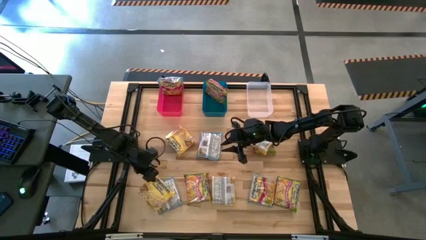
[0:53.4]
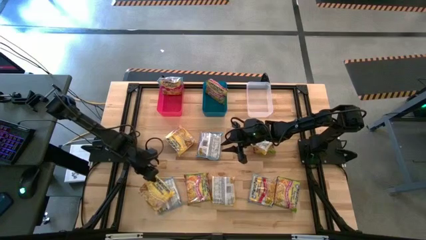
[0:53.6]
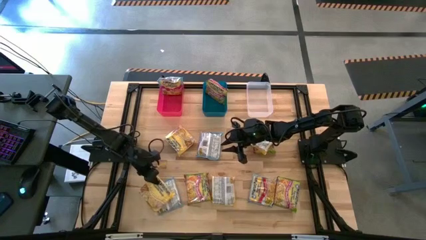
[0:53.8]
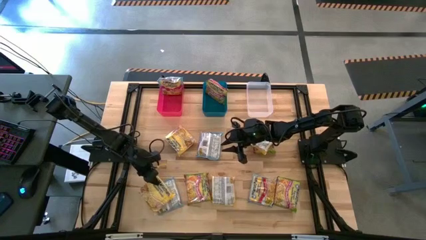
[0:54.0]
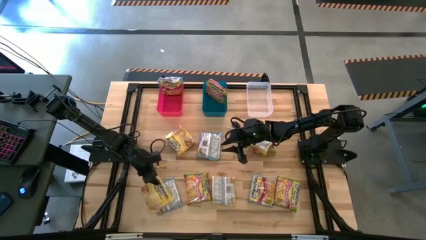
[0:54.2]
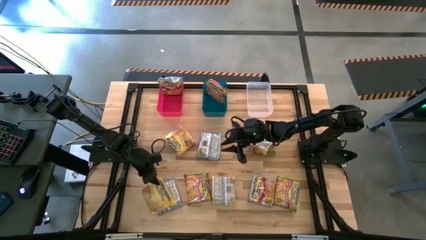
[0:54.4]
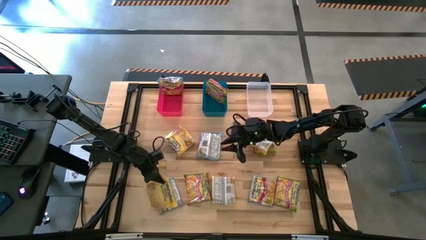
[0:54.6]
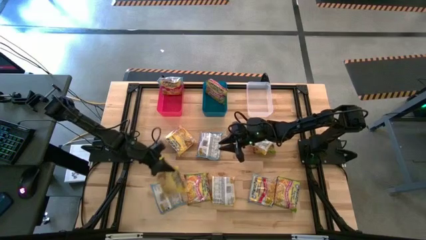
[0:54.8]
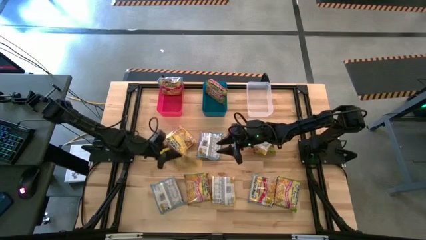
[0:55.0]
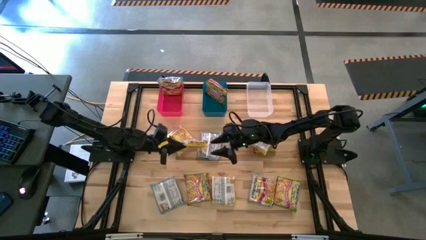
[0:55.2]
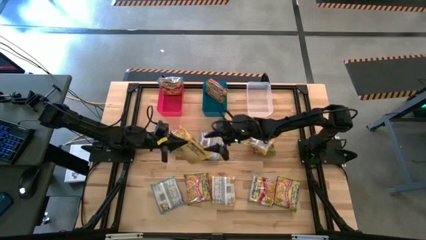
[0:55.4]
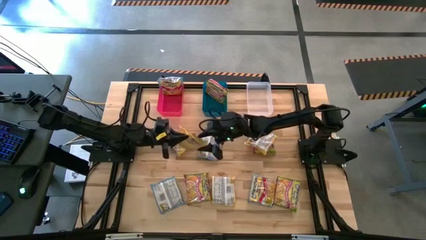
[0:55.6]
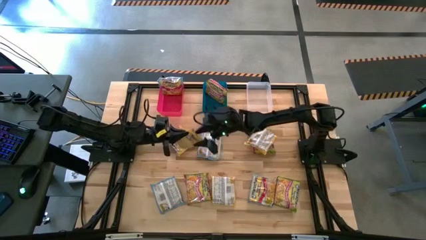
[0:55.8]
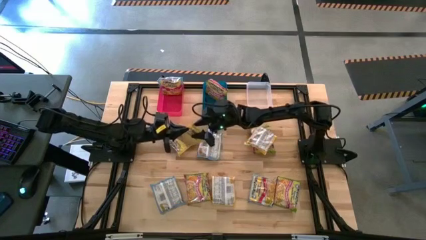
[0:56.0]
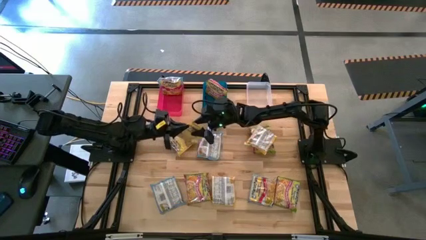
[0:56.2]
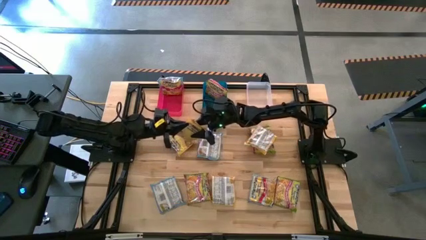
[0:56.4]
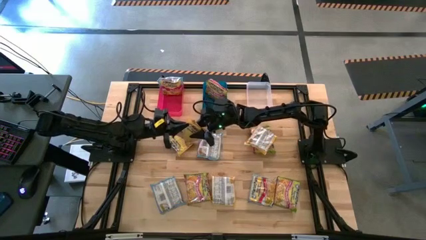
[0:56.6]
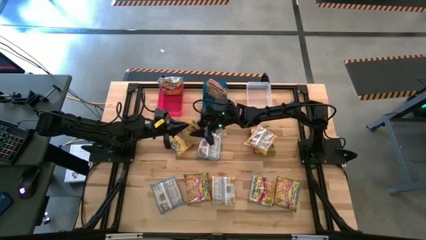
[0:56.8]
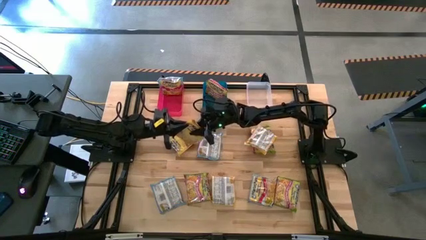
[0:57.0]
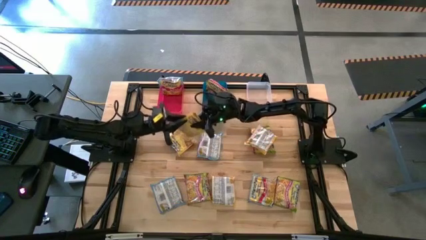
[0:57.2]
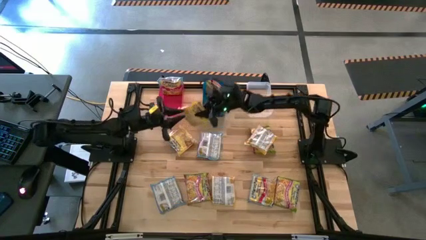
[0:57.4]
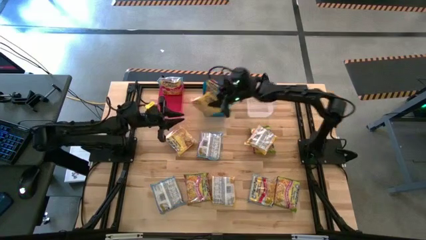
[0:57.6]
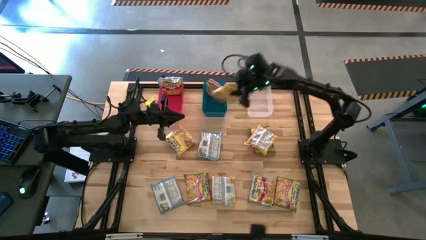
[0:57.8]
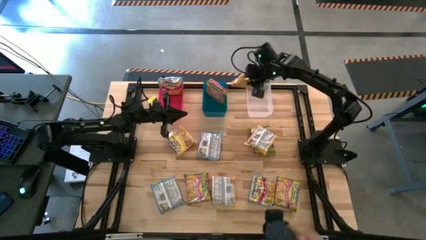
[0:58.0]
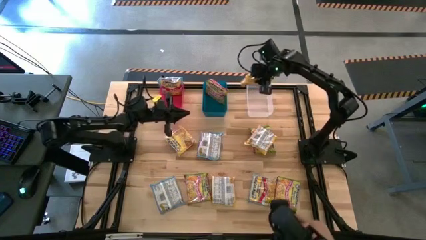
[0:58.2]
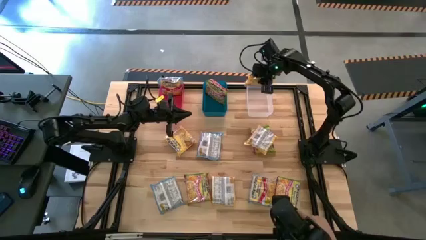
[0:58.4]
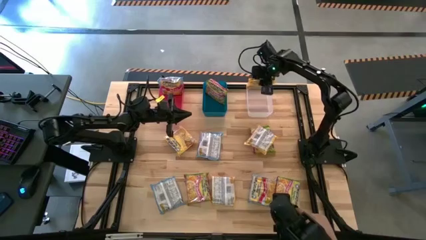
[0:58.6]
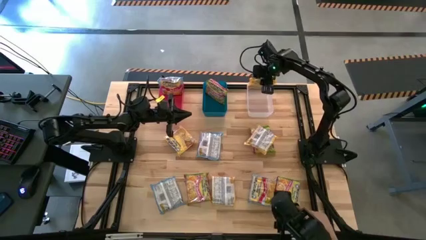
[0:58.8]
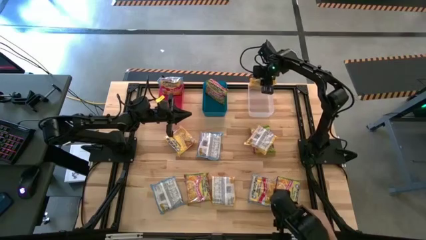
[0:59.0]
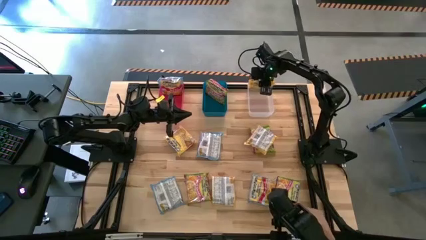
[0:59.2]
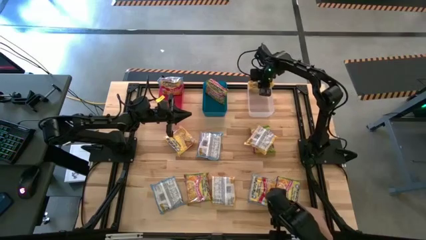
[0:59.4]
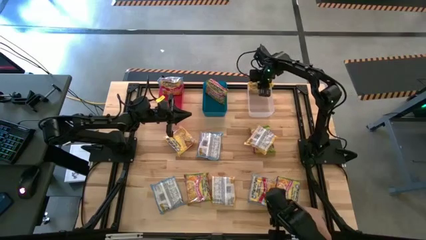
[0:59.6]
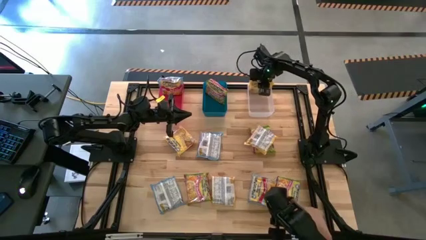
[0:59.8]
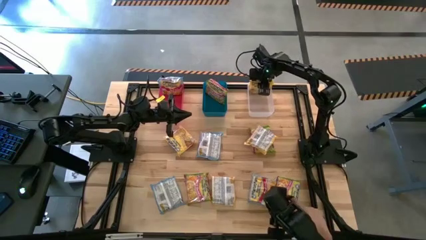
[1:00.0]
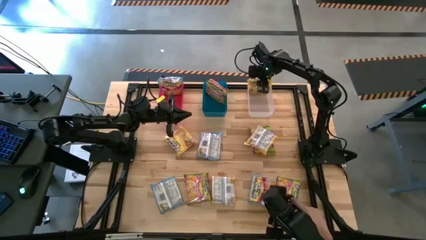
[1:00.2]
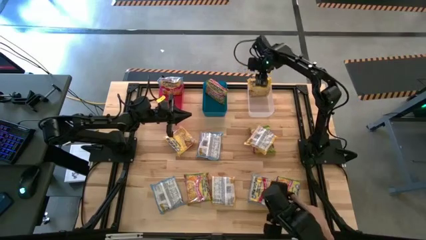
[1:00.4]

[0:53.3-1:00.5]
Task: Sort Maruchan noodles
Put the bottom left yellow noodle pack into the transparent bin

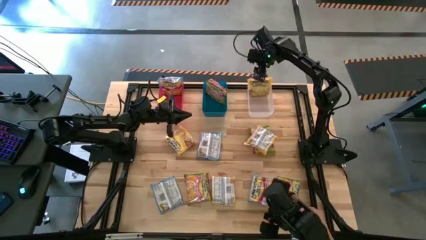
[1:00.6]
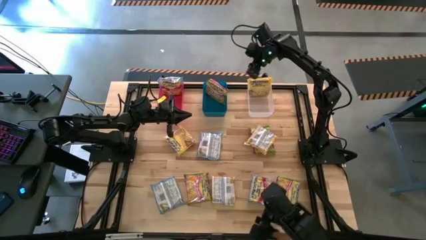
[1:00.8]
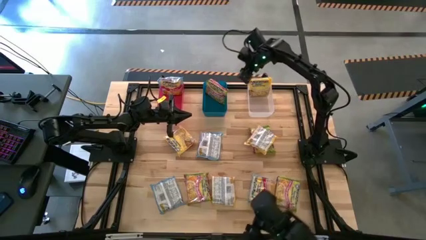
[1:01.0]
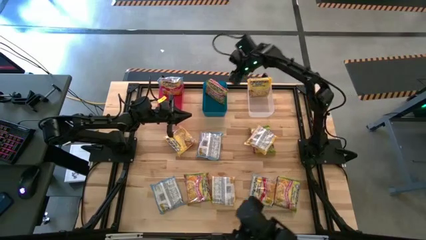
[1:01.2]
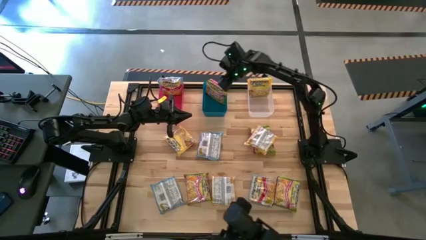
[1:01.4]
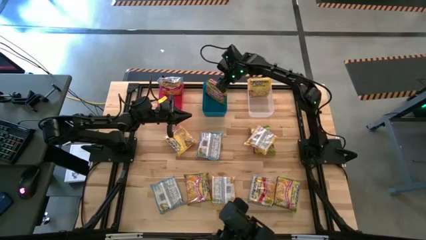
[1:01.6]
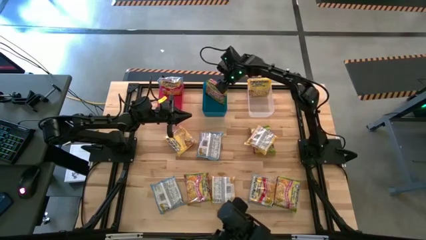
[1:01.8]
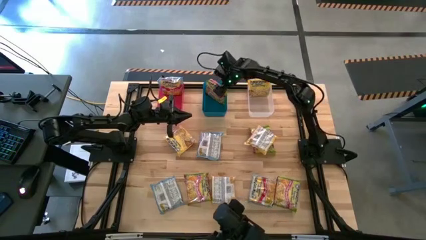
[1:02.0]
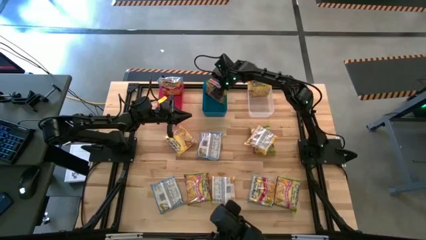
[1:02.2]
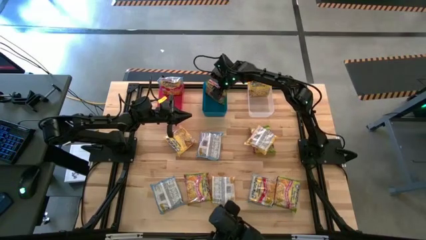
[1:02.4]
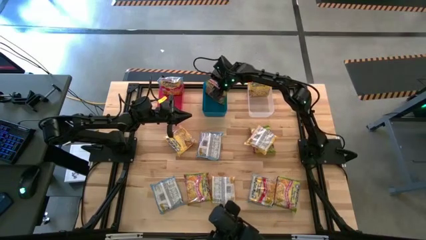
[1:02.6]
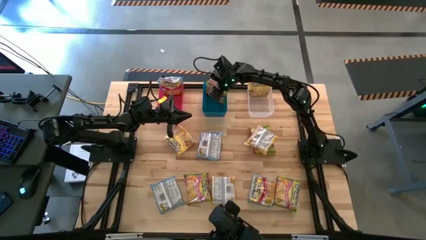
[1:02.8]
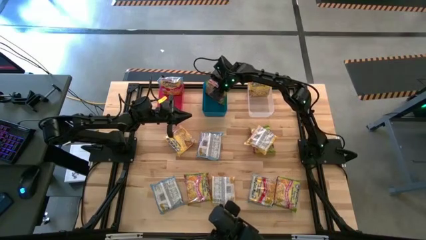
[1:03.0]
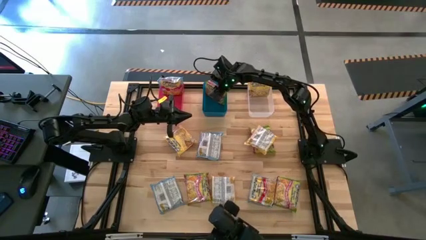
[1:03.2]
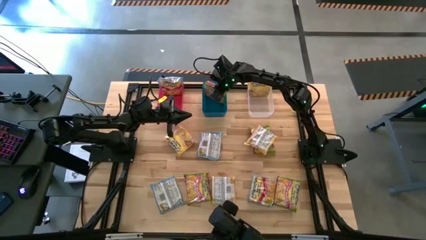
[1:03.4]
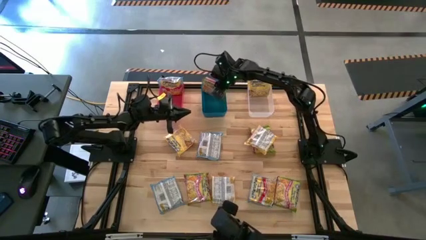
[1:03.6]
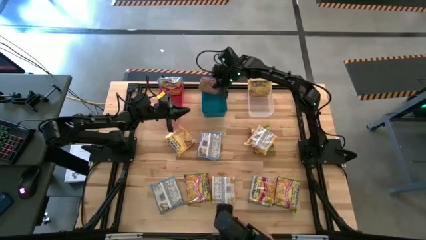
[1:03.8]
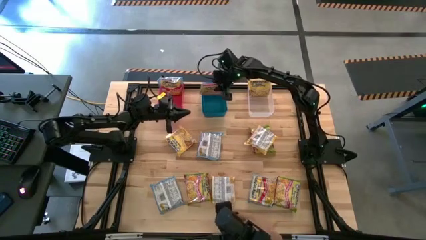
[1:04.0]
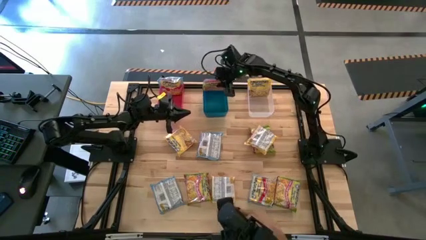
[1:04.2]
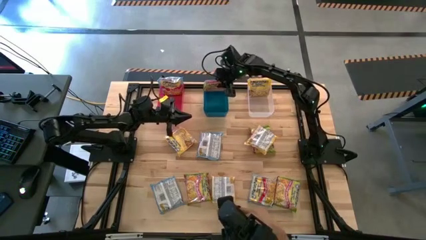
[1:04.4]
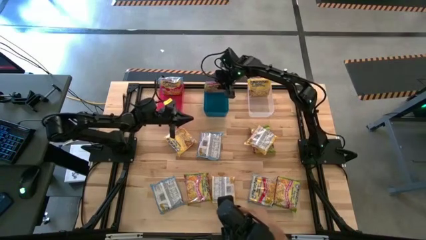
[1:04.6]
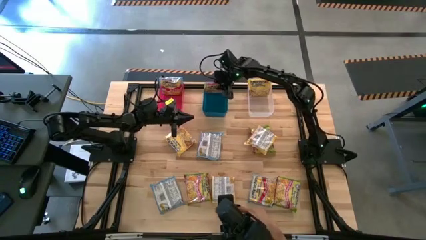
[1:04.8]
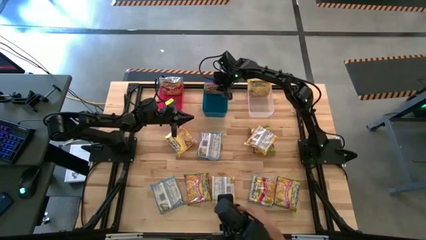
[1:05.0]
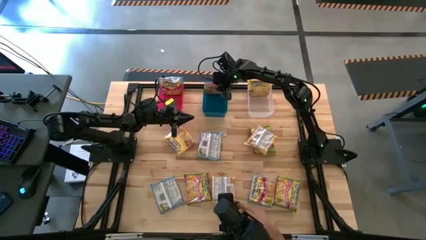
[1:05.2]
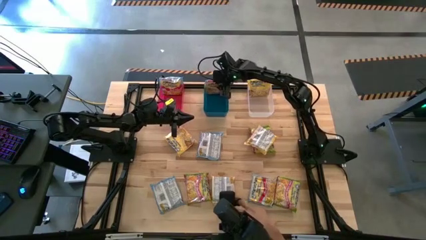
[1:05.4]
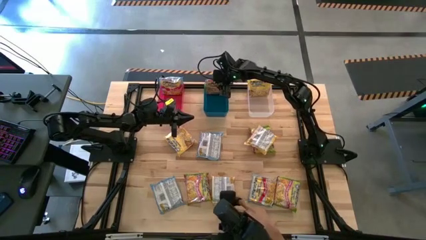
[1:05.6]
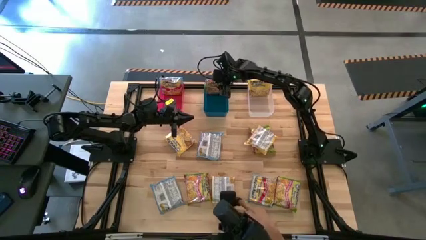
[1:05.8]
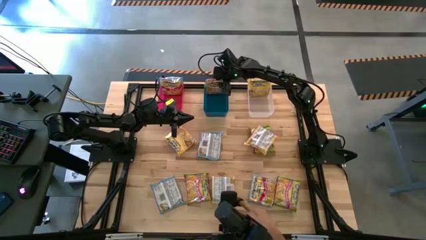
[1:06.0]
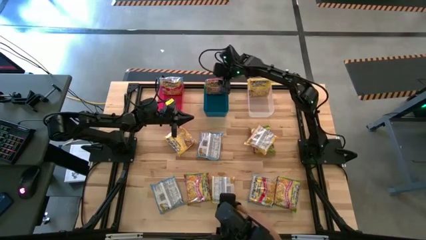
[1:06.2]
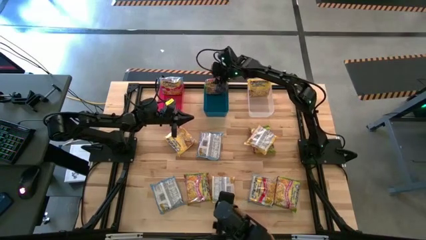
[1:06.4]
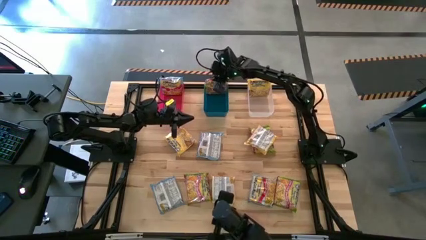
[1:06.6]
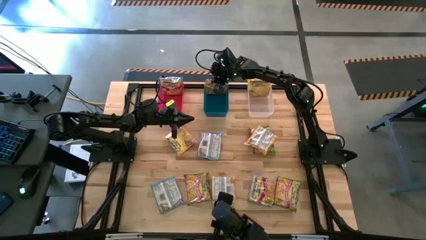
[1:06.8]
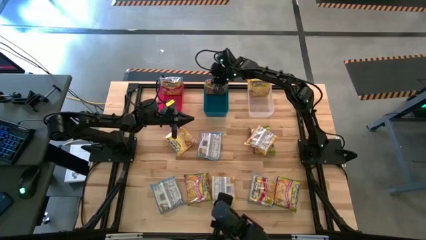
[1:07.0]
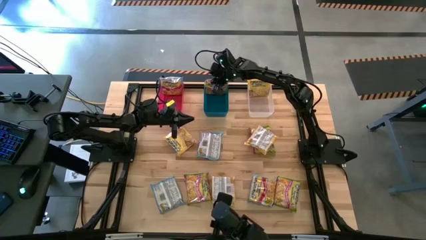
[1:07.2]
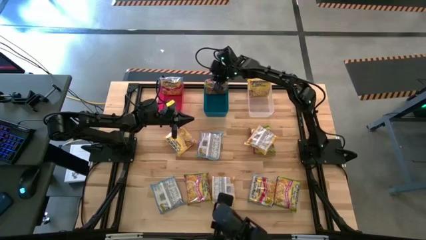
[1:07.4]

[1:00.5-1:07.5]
Adjust the green noodle pack in the blue bin
